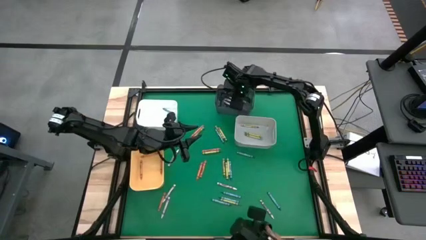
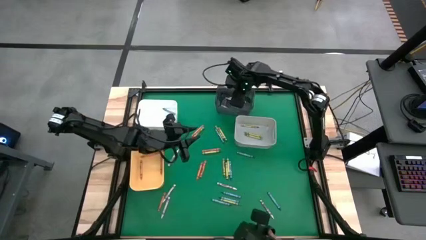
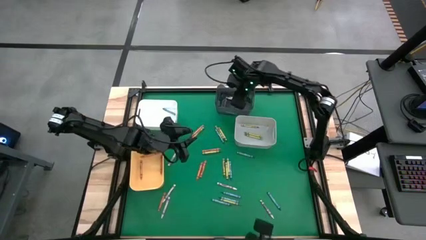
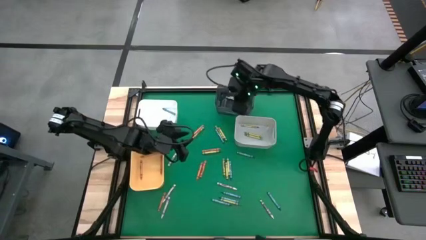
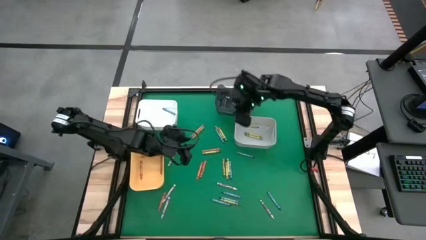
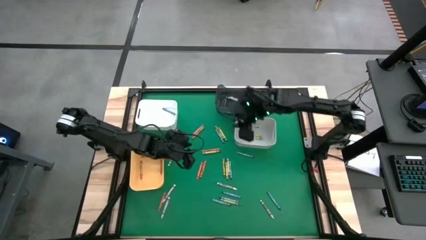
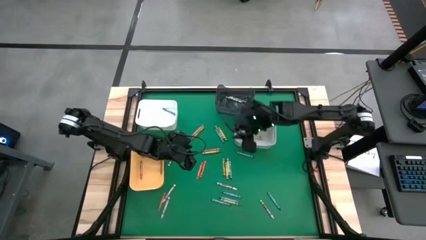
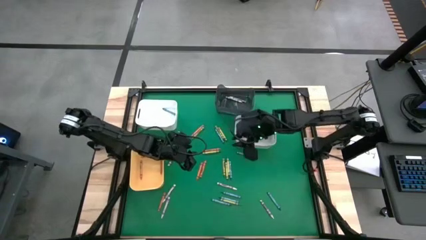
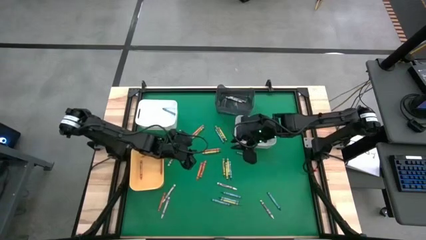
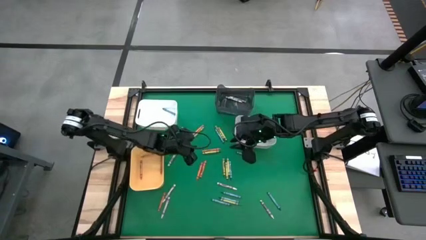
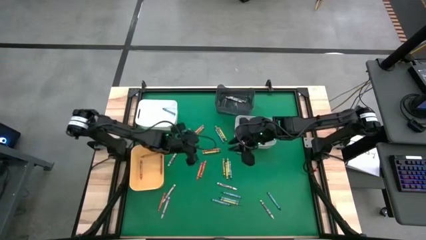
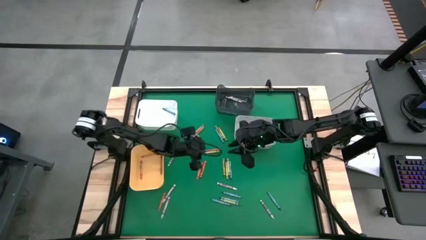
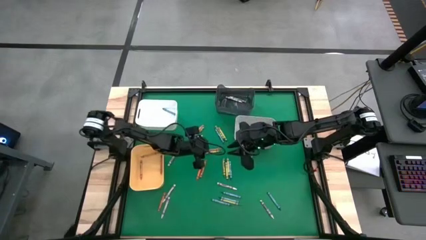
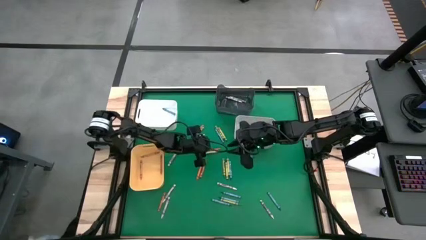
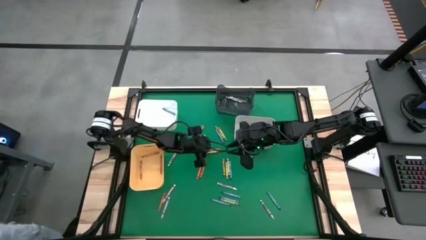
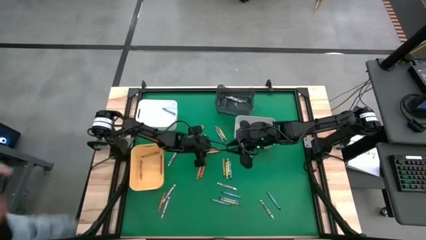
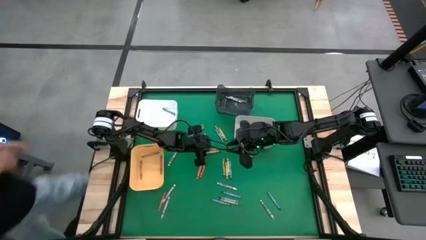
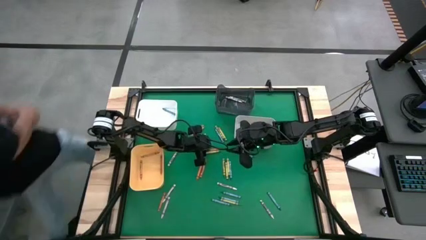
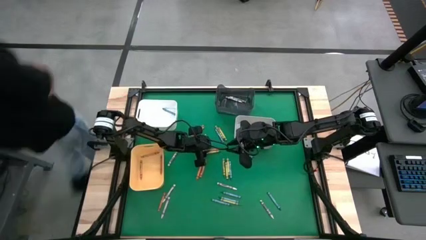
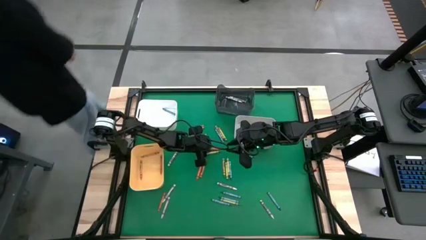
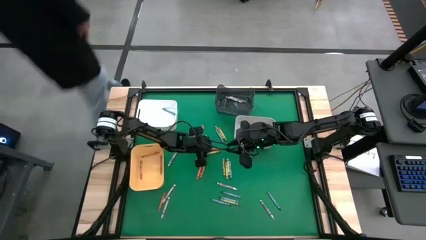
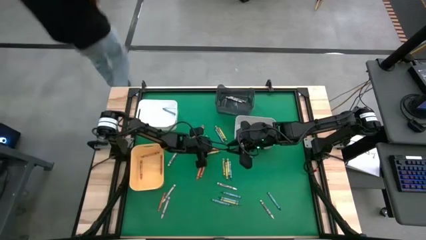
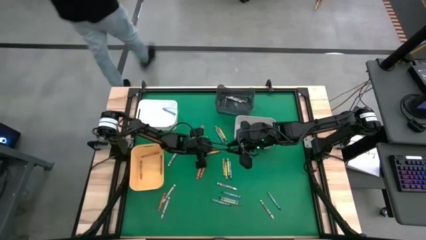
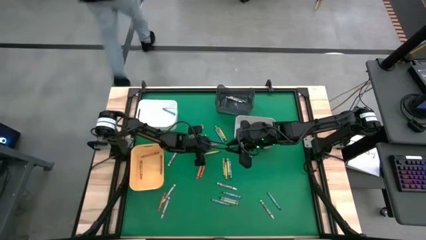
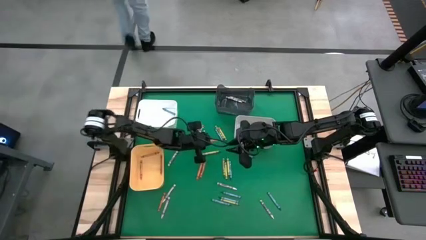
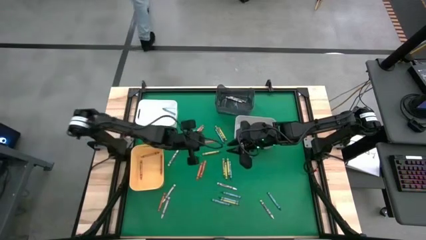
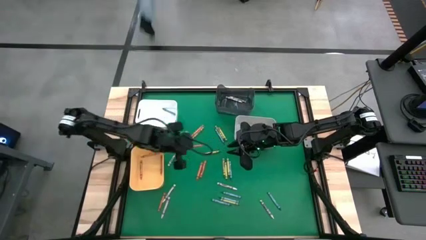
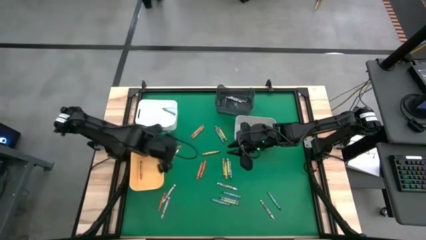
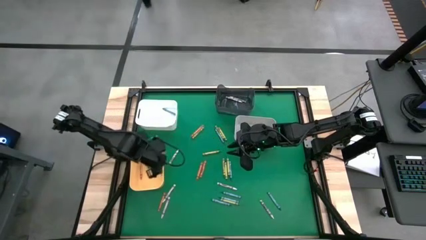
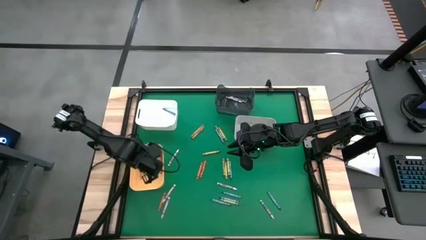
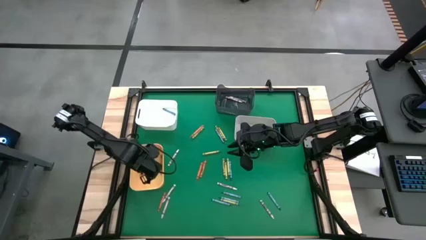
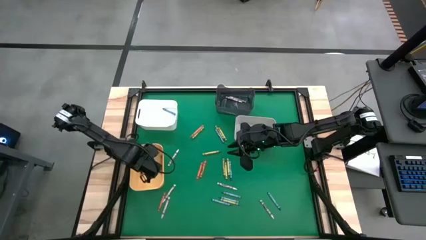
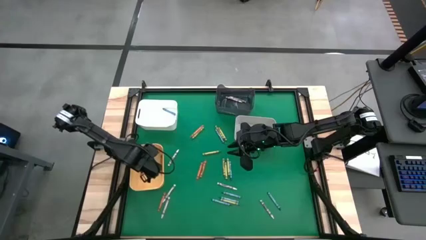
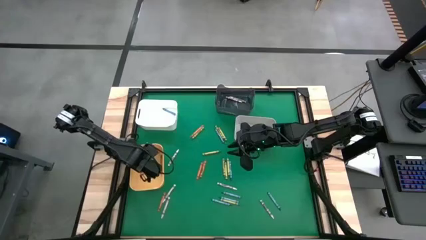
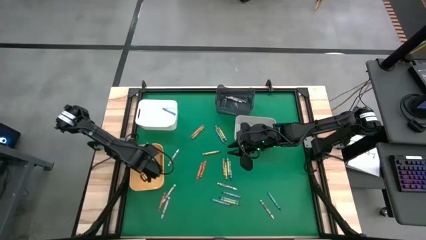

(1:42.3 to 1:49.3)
Task: Sort crayons
Put the orange crayon into the orange bin

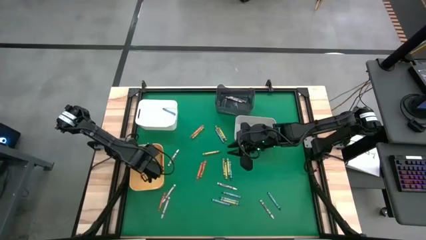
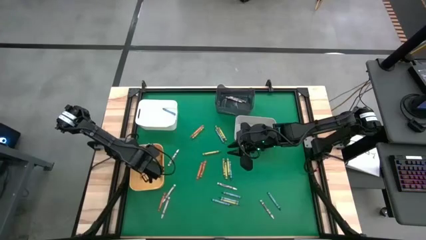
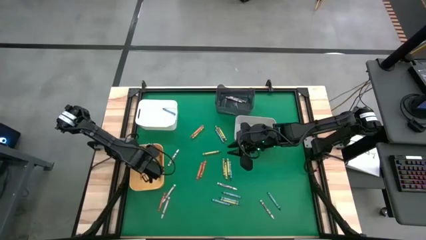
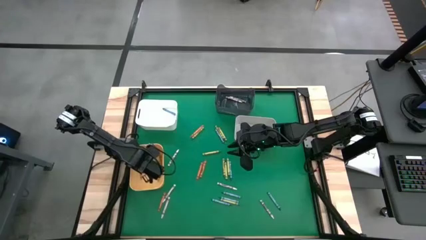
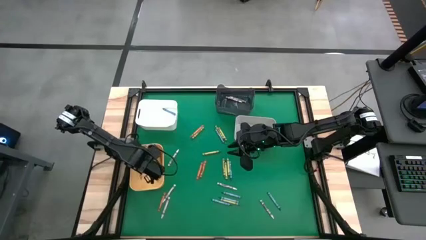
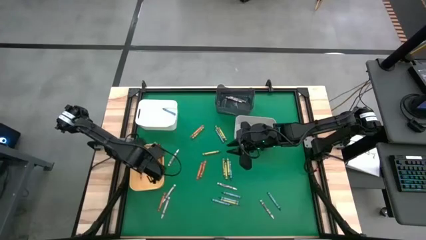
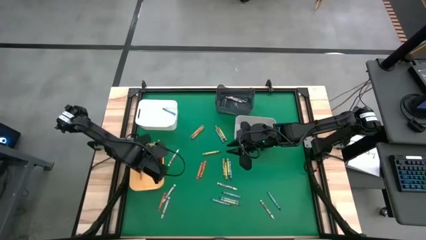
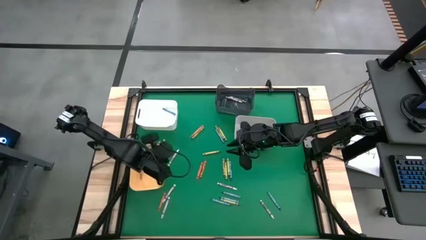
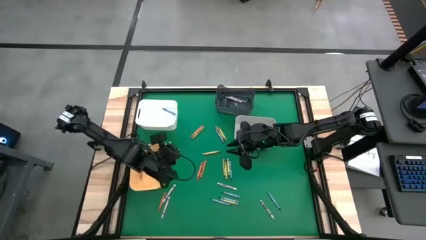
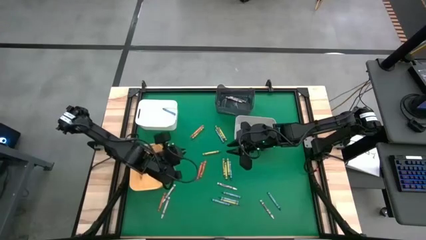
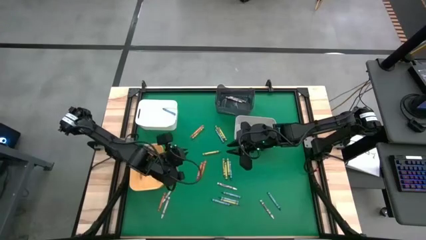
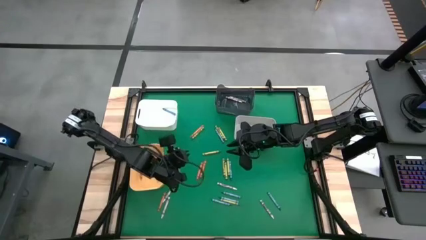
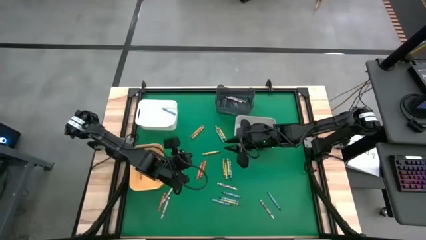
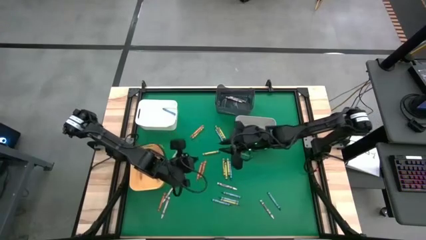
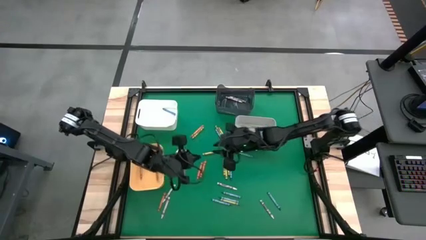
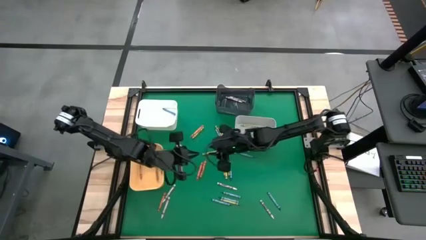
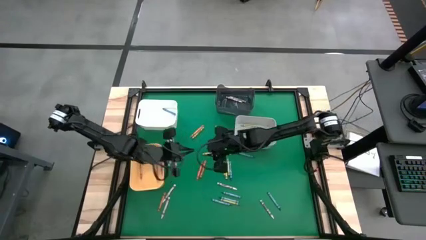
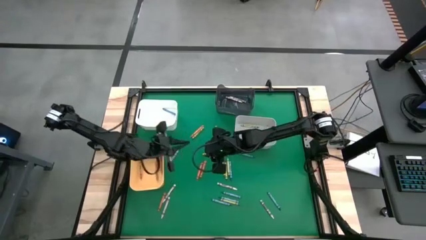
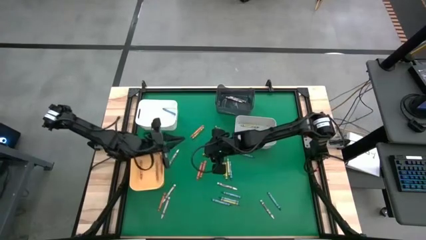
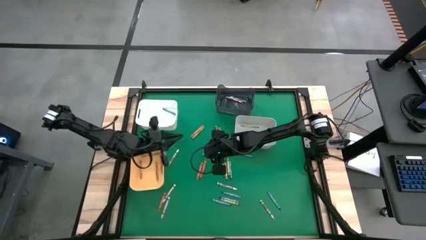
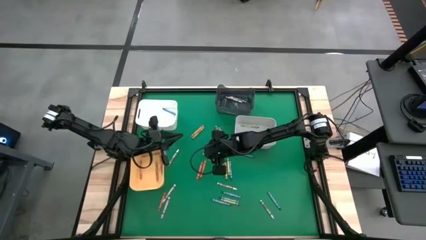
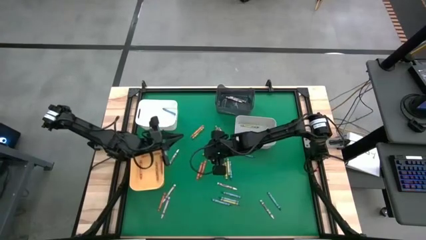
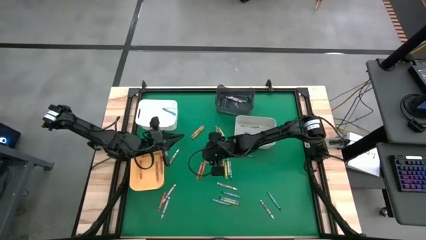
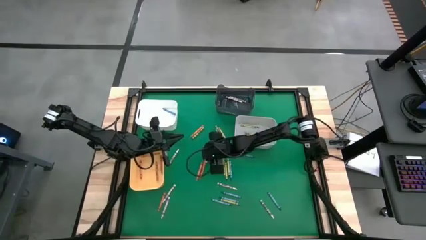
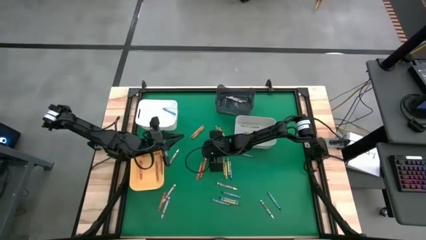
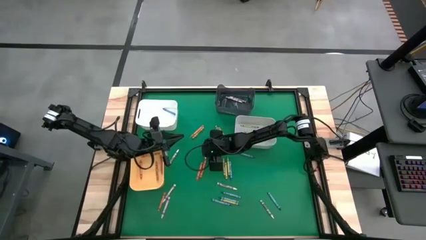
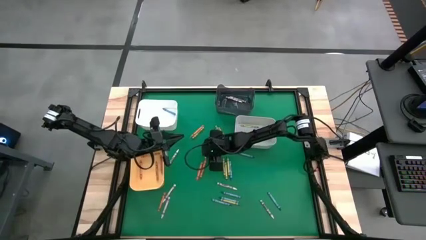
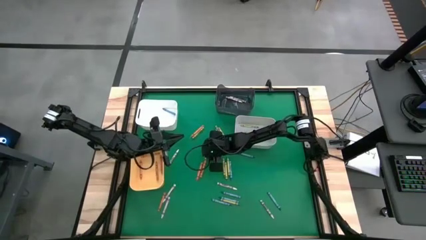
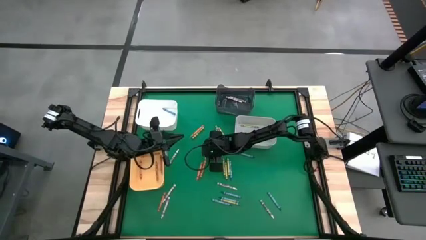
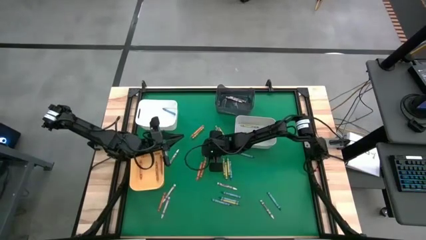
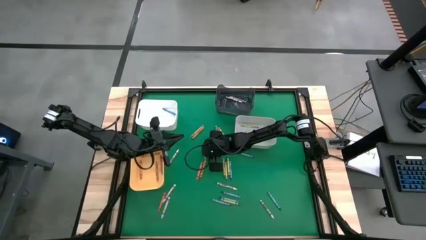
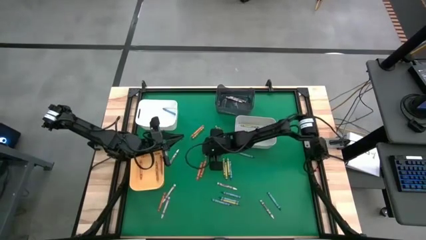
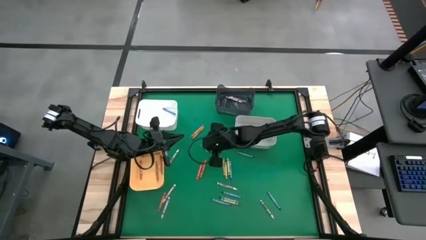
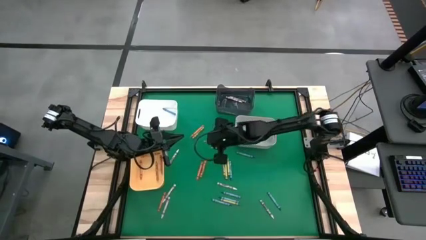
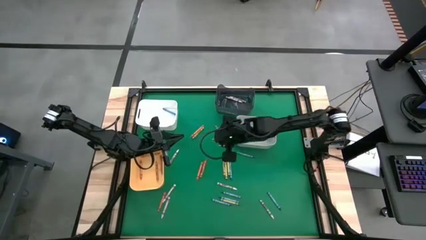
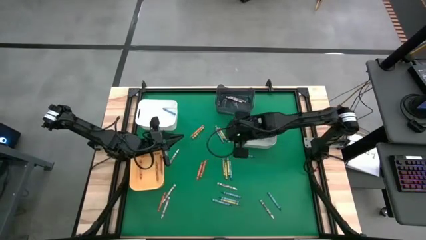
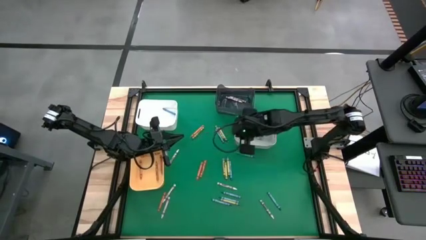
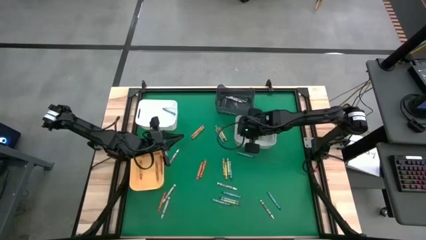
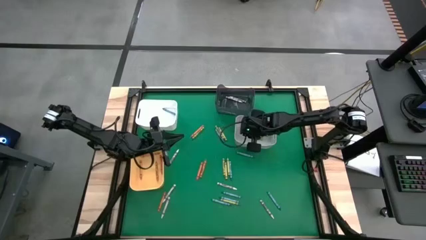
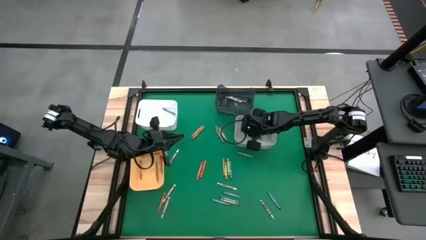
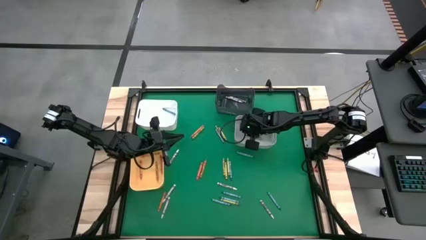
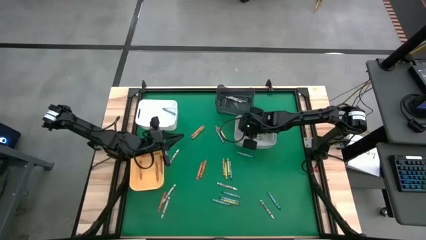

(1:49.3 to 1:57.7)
Put the green crayon into the gray bin
